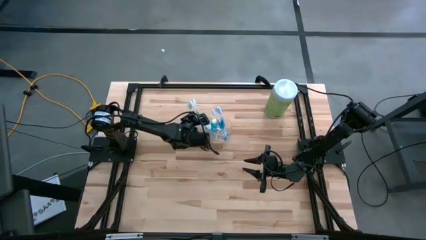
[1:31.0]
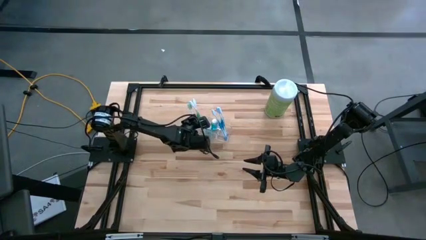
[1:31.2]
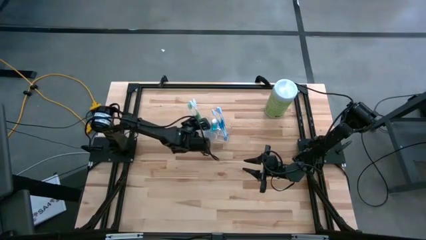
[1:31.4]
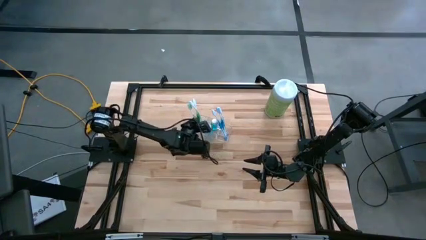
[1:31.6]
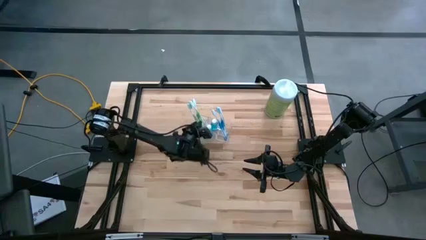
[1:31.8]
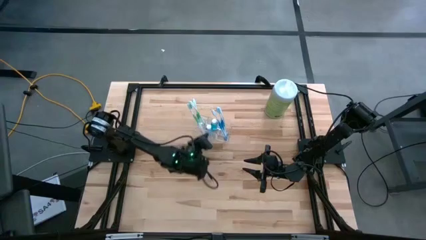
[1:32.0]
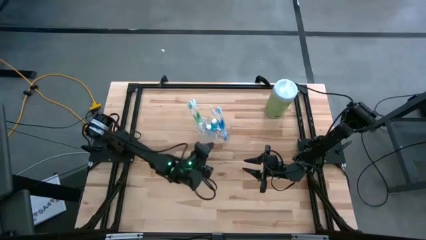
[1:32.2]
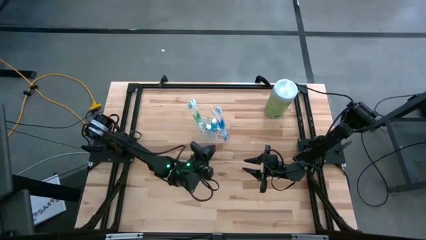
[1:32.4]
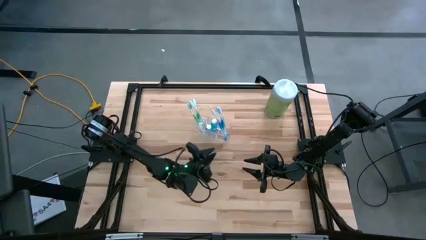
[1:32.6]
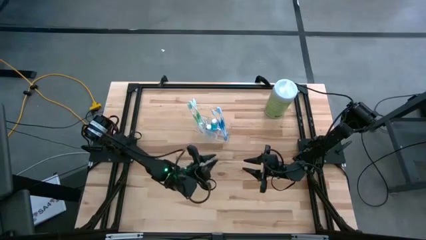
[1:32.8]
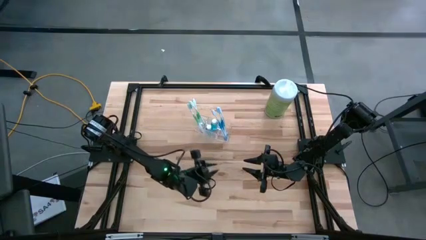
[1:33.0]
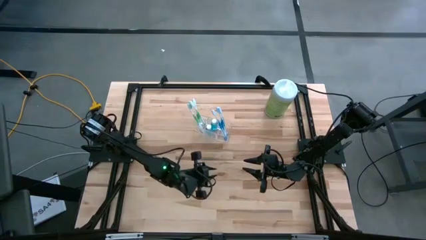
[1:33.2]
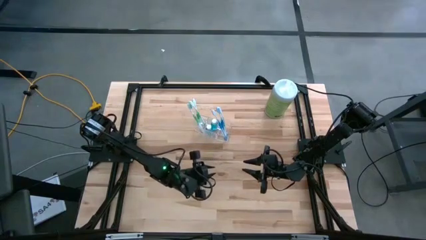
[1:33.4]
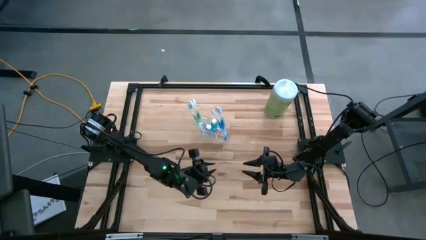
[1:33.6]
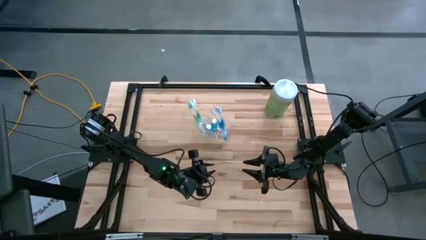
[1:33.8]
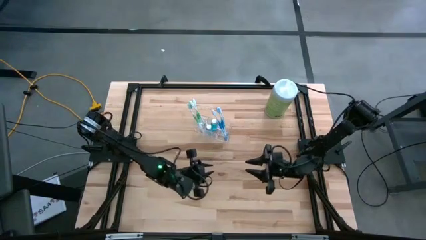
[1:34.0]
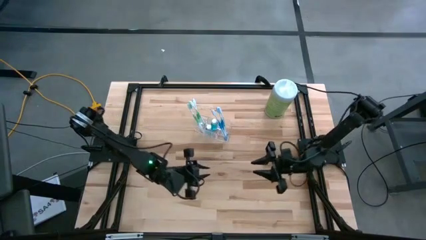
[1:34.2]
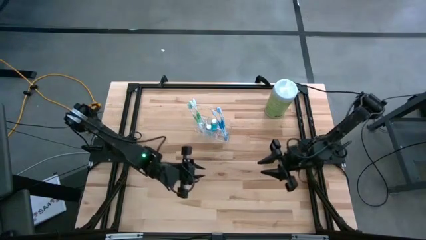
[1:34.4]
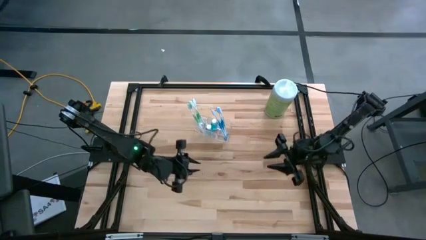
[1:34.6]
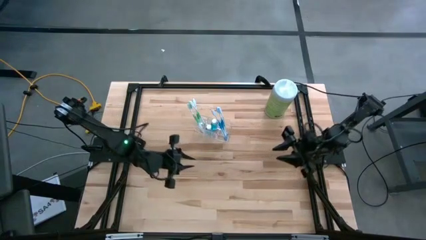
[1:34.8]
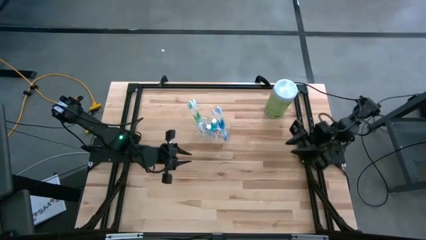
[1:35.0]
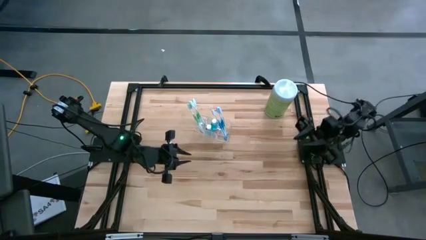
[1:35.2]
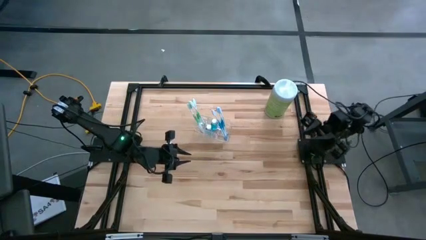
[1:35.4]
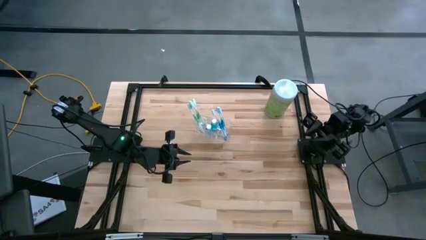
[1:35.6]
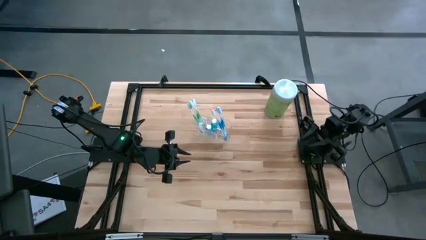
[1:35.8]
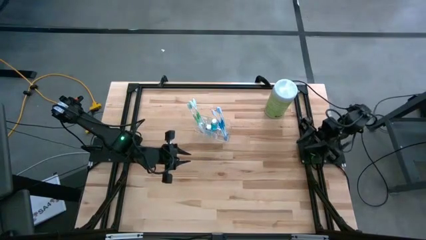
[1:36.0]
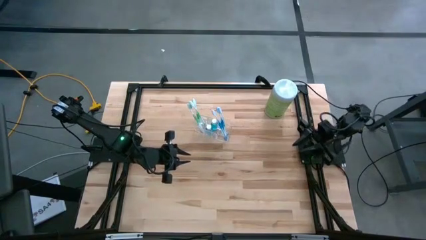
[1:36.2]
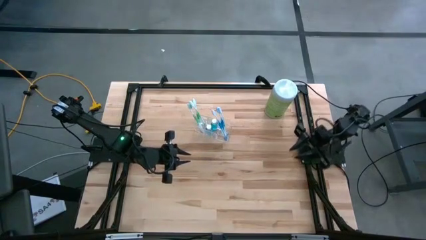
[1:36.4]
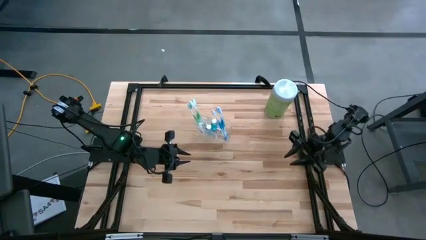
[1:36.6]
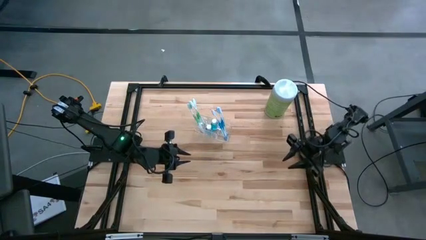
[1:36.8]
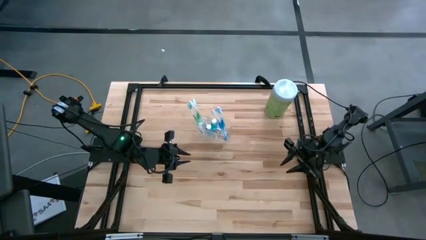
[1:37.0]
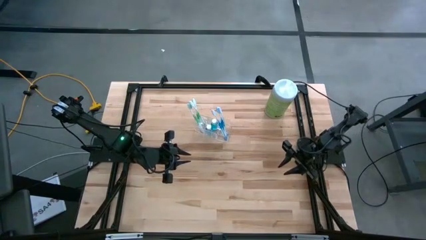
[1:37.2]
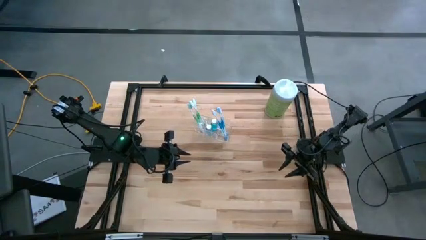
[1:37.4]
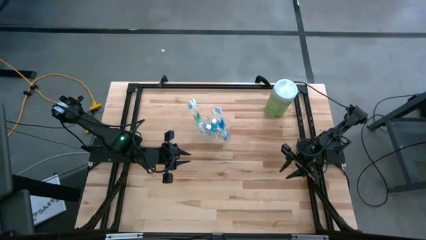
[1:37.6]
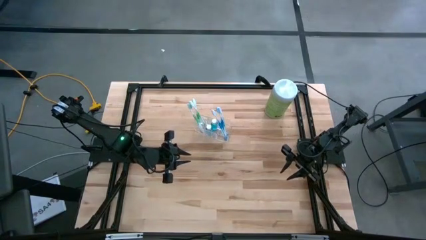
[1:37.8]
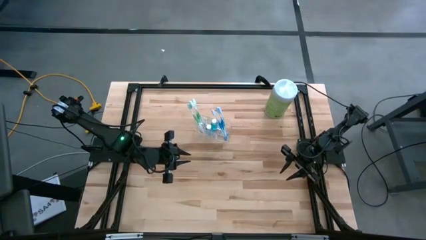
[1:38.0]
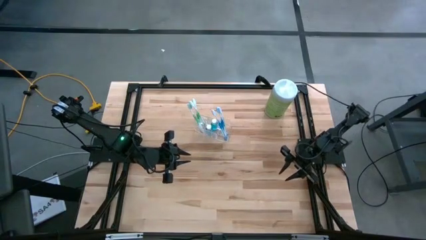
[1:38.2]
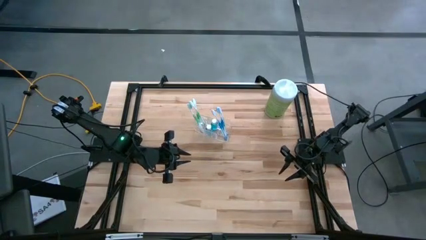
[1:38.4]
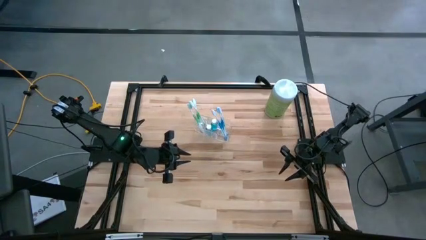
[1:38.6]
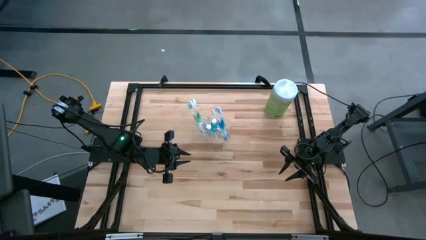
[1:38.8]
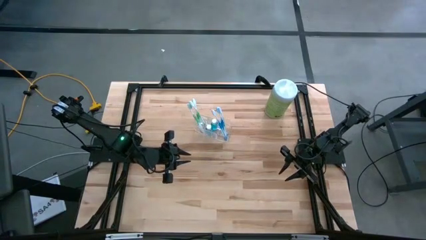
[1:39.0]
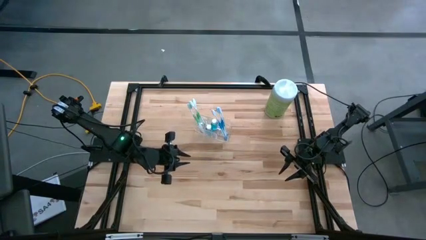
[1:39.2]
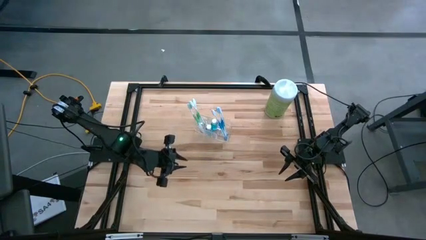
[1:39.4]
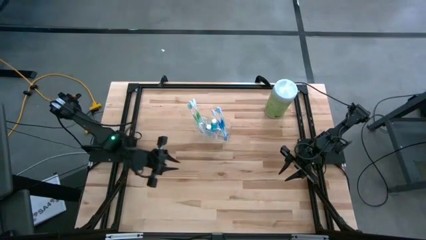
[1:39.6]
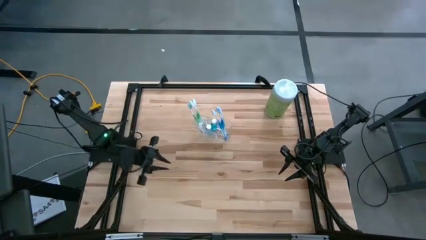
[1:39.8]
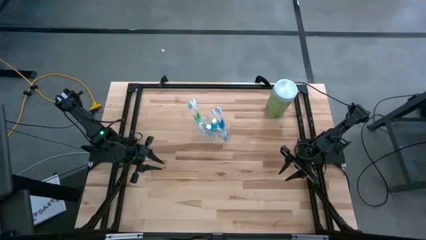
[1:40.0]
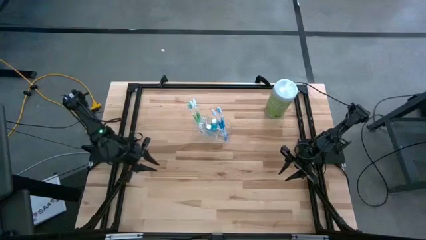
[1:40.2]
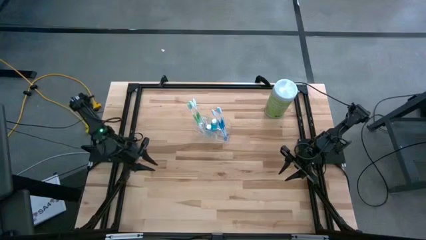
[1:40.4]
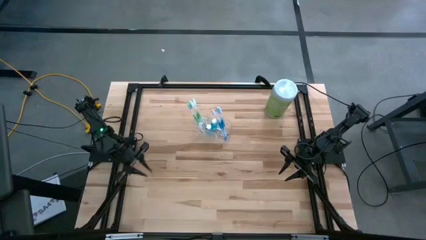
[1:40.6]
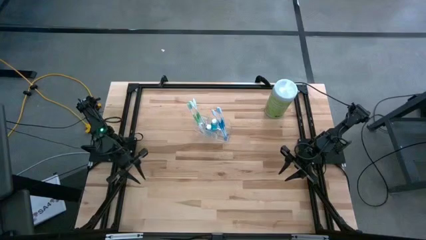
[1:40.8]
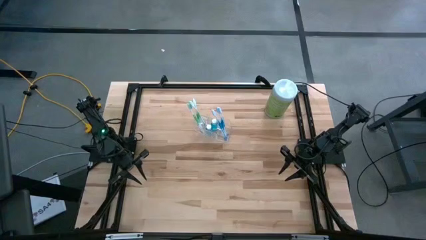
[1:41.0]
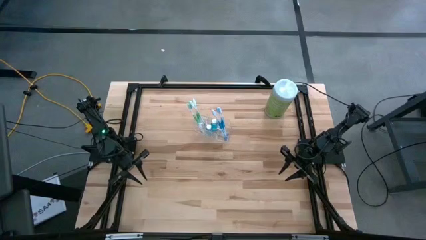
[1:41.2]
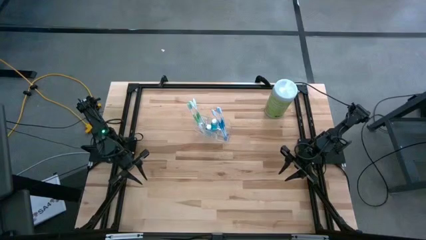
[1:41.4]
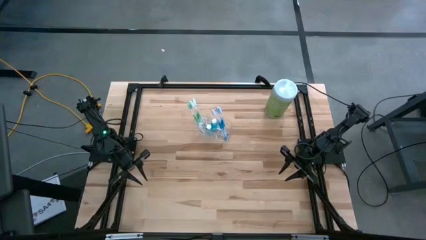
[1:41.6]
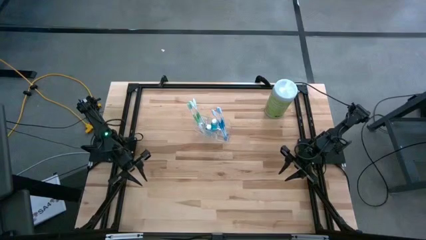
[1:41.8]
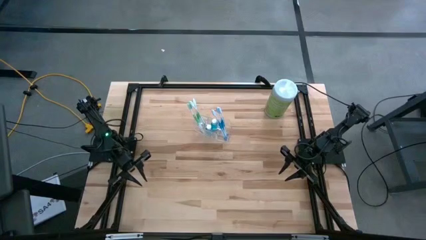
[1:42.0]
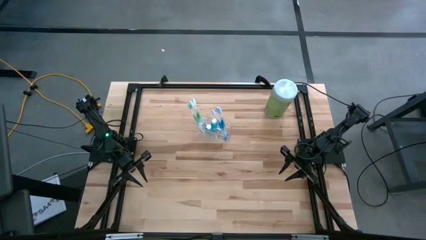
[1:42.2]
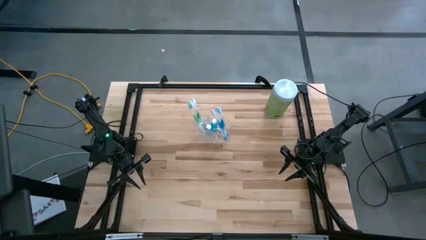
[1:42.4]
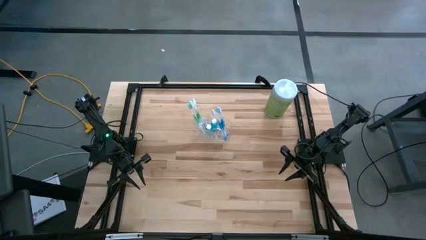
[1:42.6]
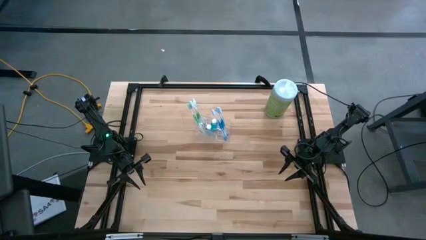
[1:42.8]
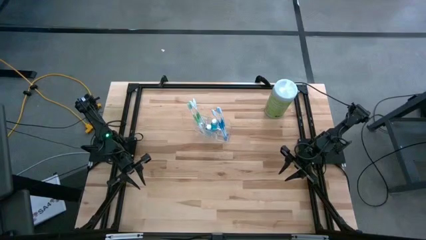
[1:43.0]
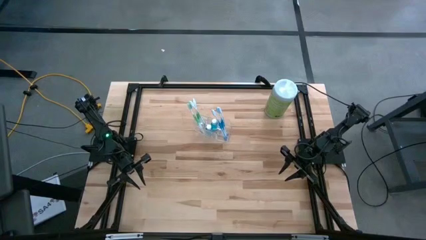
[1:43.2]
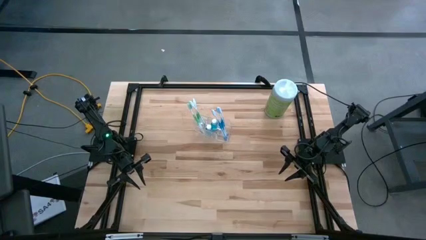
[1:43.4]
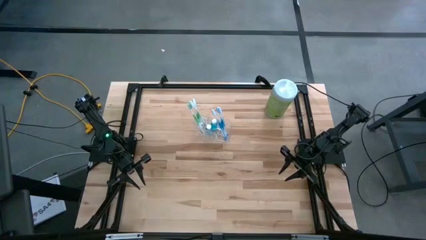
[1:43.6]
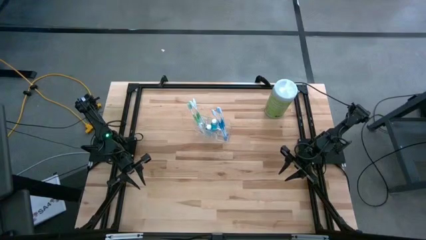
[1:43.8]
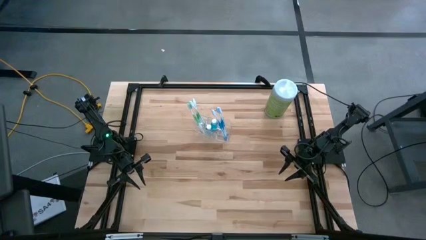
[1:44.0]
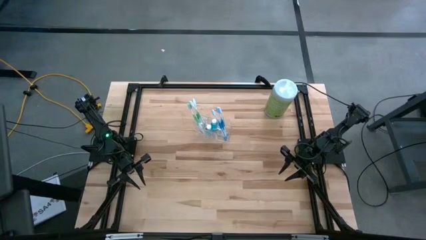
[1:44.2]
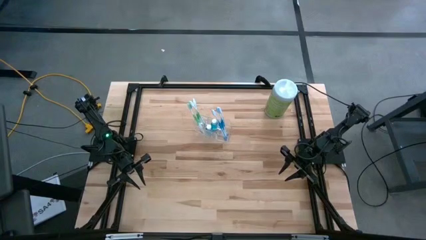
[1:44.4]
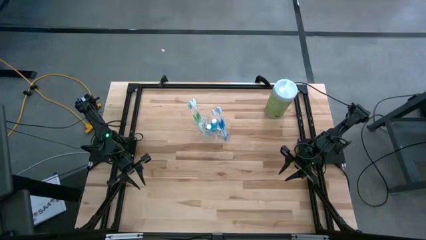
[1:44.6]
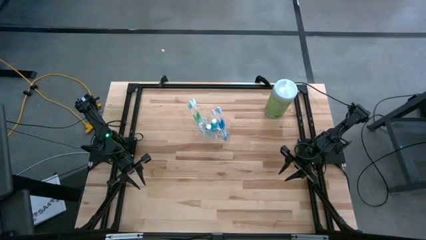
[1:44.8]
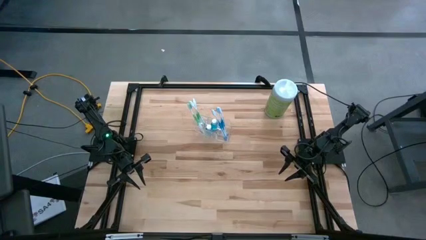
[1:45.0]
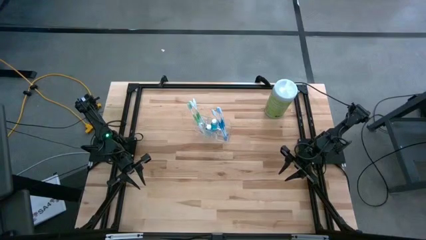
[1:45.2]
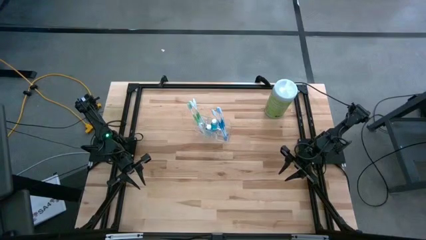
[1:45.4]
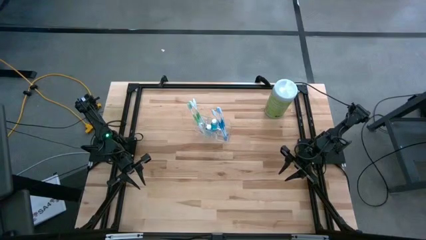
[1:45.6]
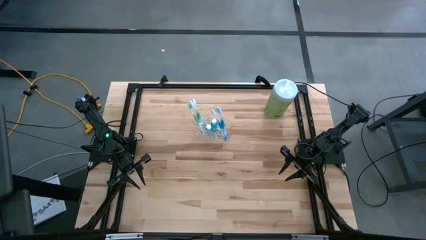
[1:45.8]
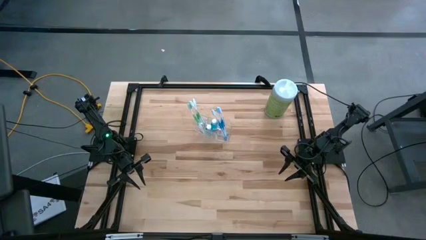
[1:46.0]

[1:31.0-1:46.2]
Task: Pick & Place toothbrushing station
Return to Home Position
